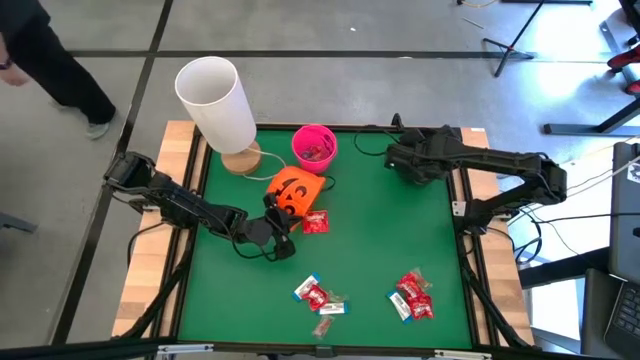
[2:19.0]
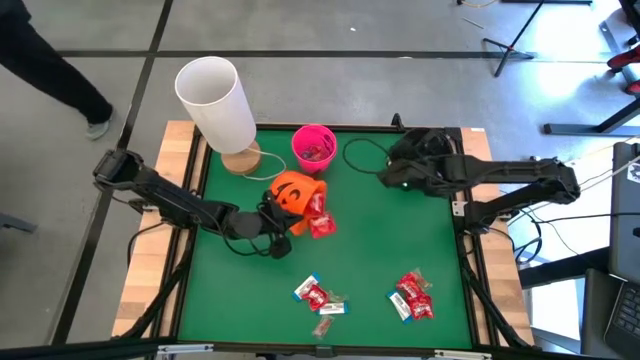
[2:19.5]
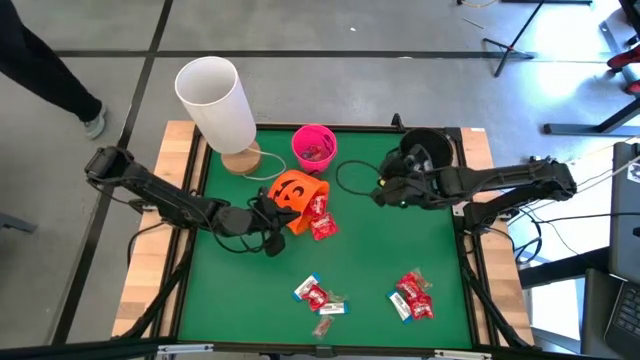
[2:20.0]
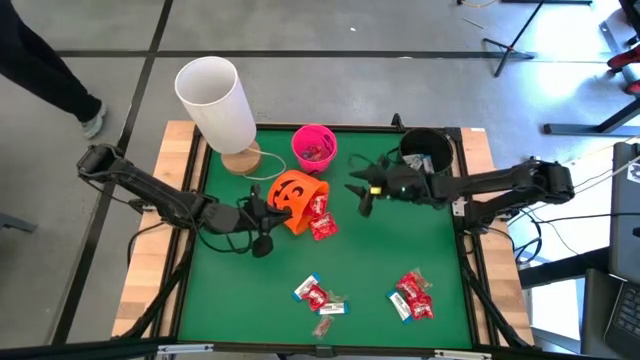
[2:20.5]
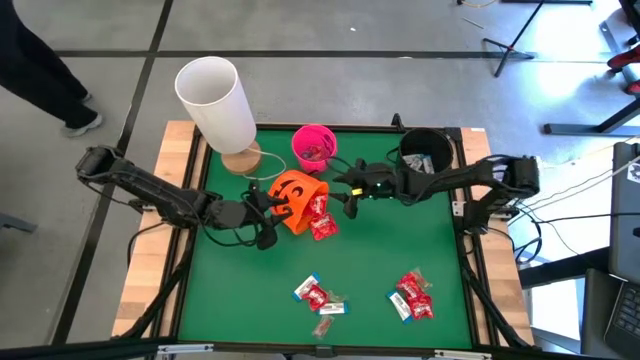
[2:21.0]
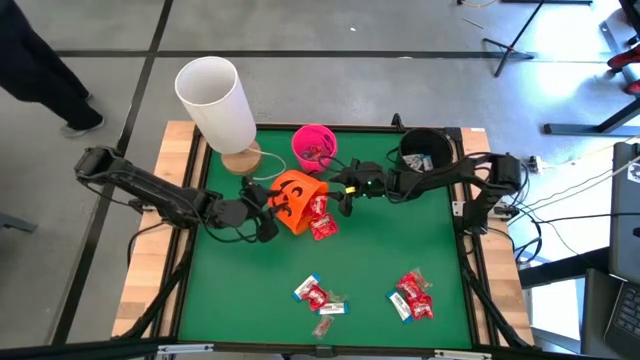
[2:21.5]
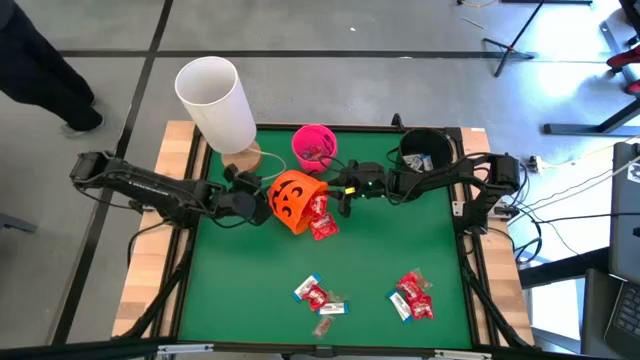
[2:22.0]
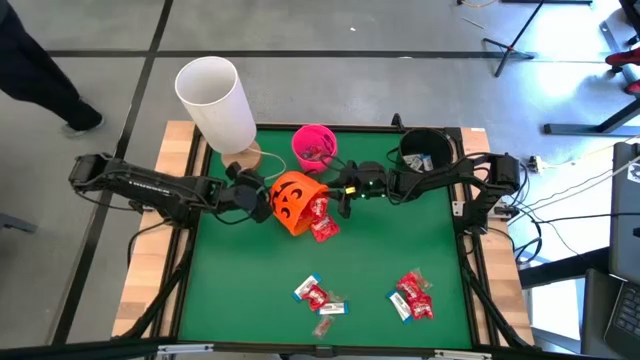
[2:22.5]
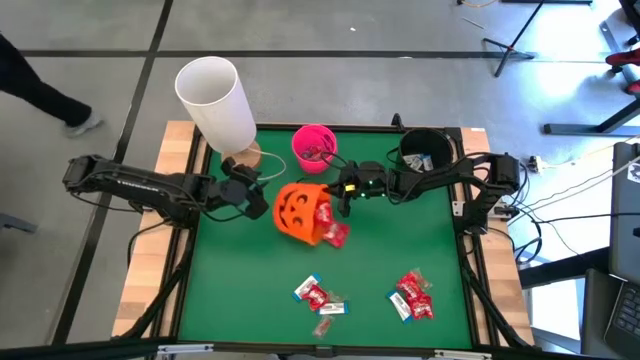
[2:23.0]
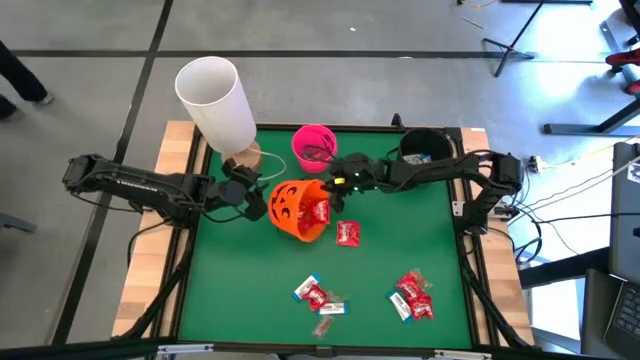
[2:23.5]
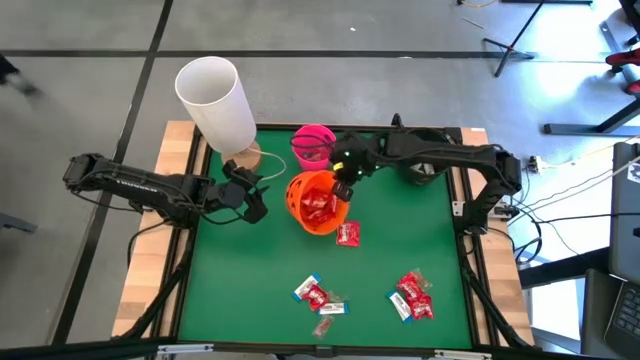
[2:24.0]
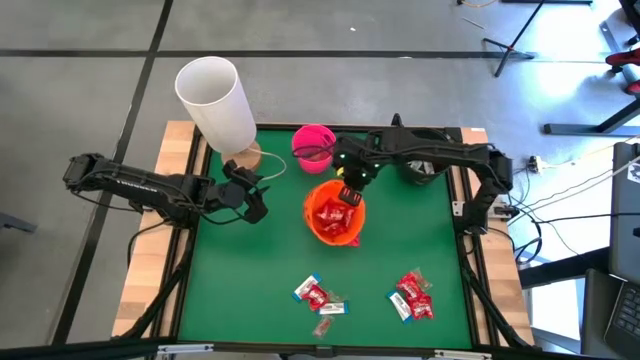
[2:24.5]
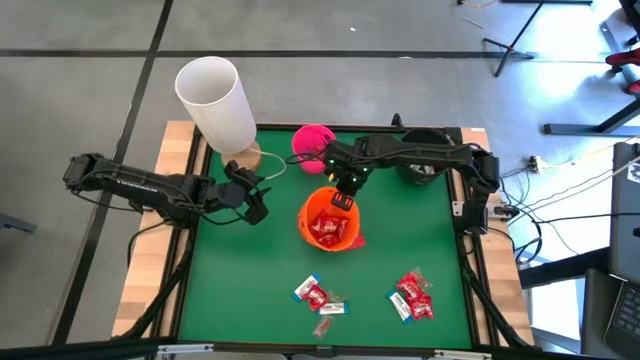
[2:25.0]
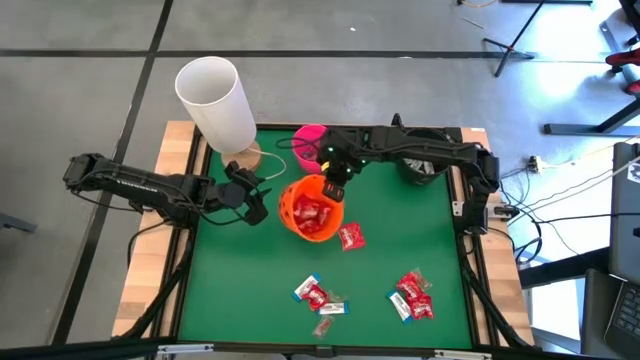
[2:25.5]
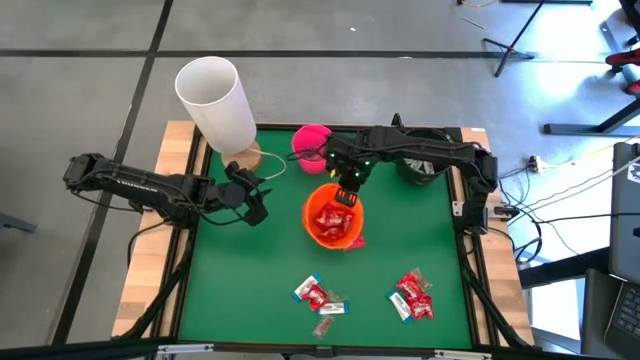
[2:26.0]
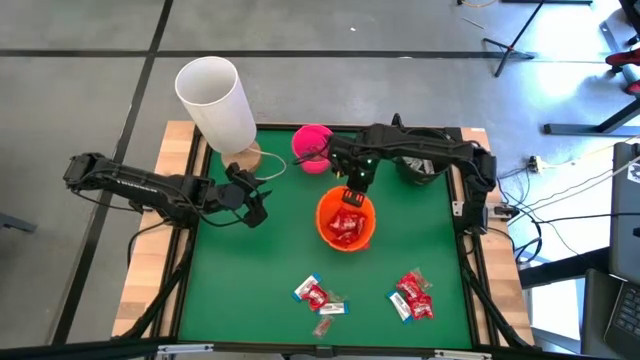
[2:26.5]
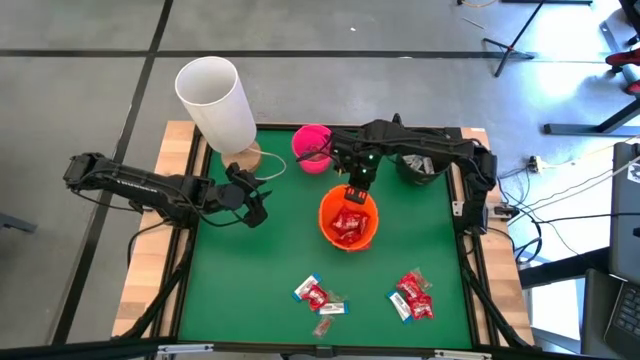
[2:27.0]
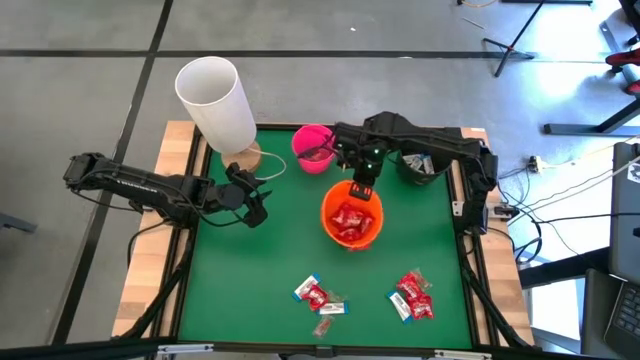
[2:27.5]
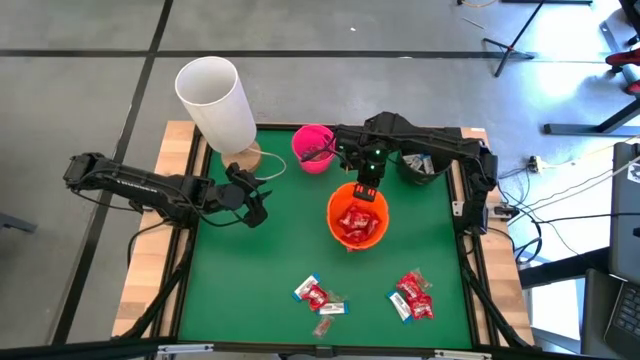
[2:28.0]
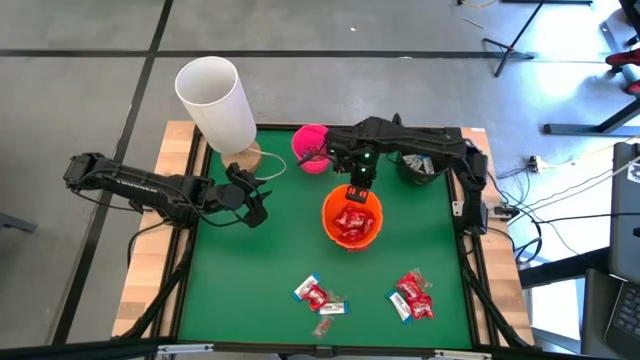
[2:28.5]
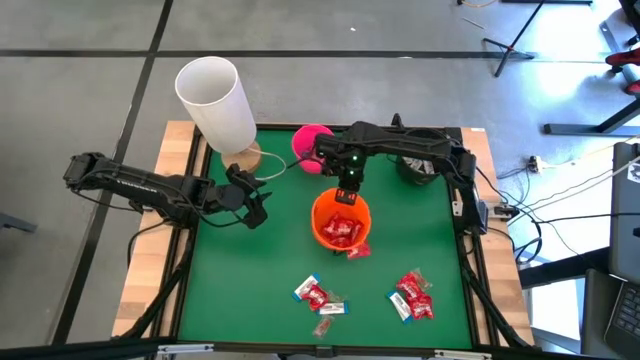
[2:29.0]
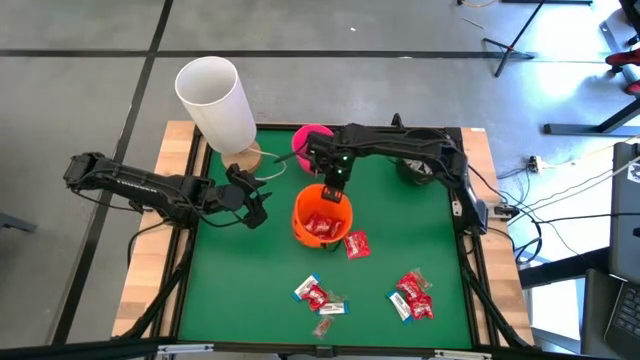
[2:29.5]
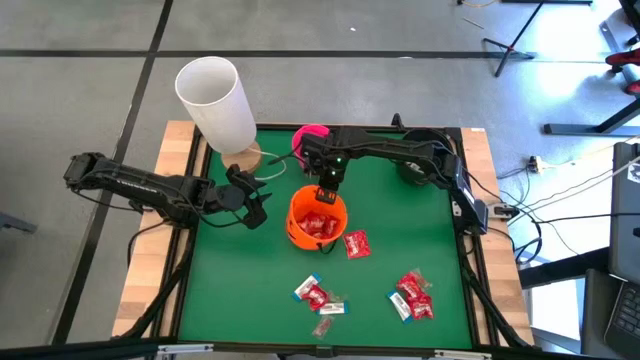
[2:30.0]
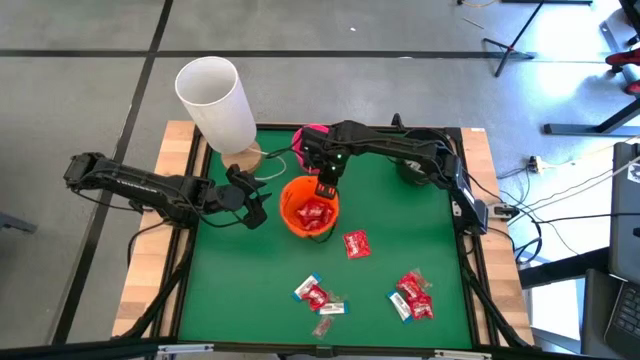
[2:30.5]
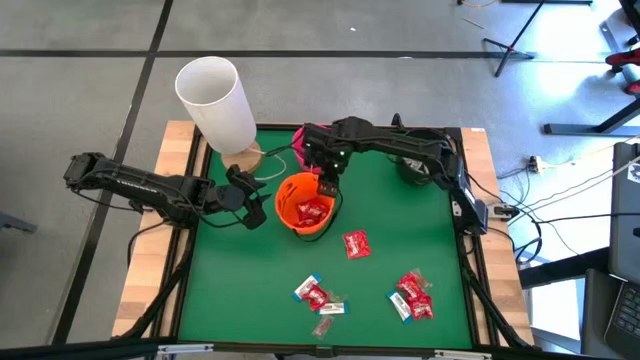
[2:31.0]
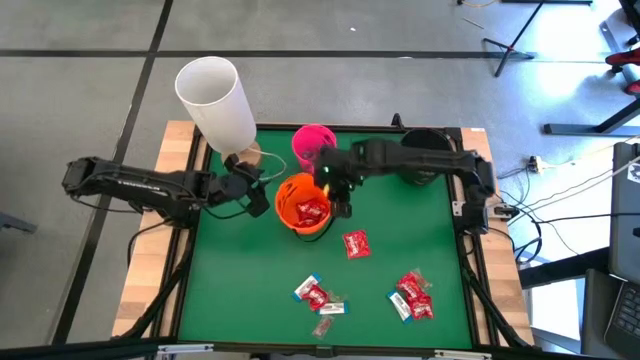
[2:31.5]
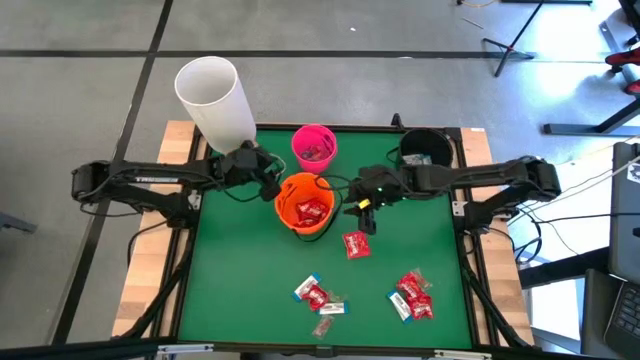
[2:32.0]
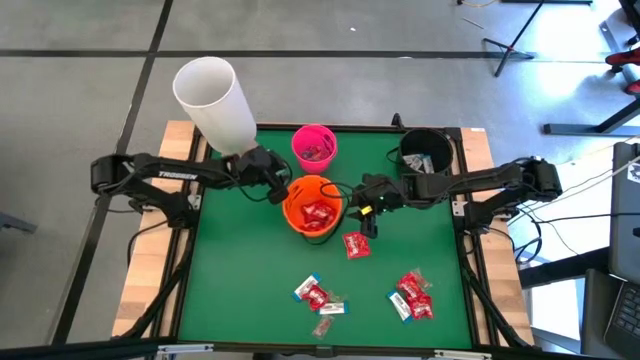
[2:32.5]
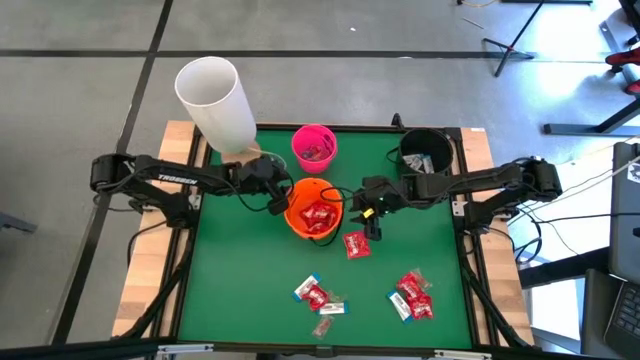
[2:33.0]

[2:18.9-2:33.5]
Task: Sort candy
Adjust the orange bucket

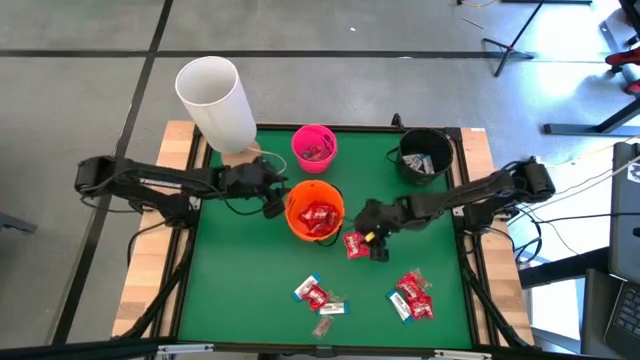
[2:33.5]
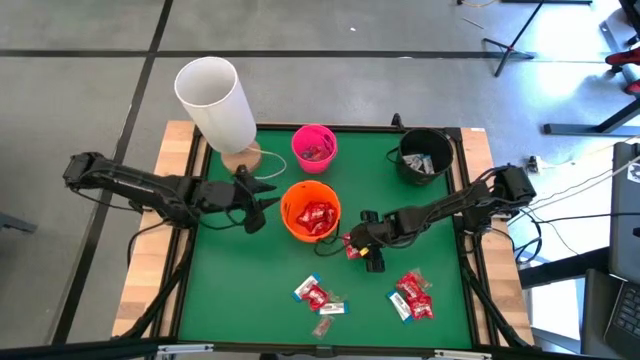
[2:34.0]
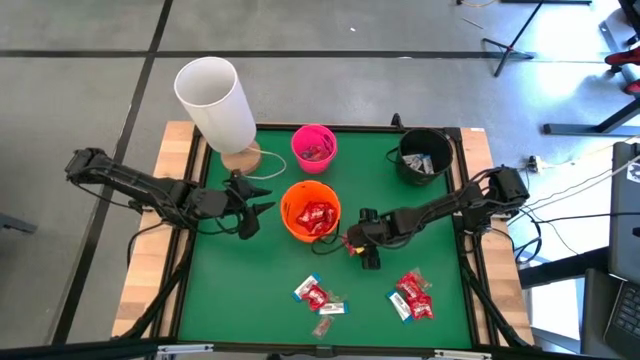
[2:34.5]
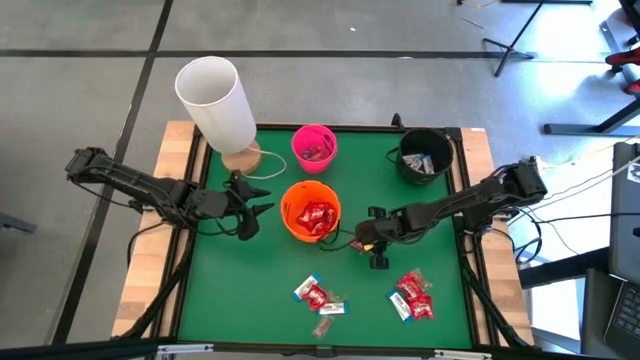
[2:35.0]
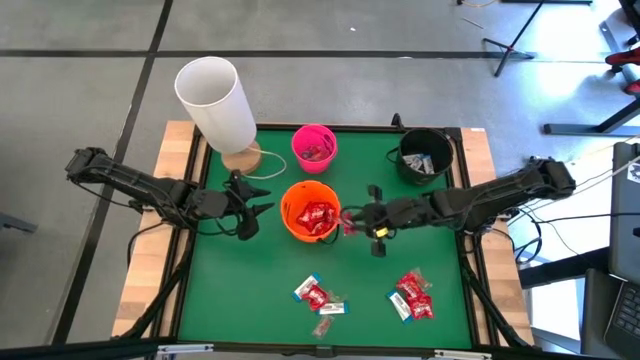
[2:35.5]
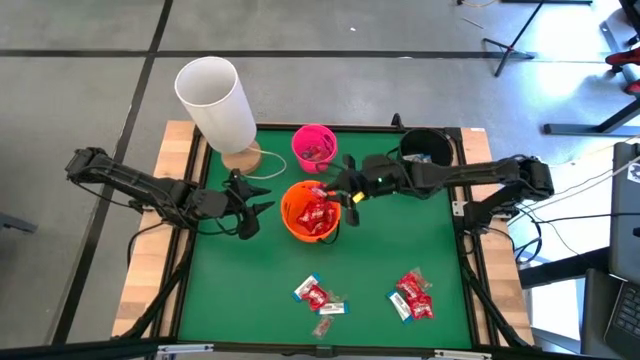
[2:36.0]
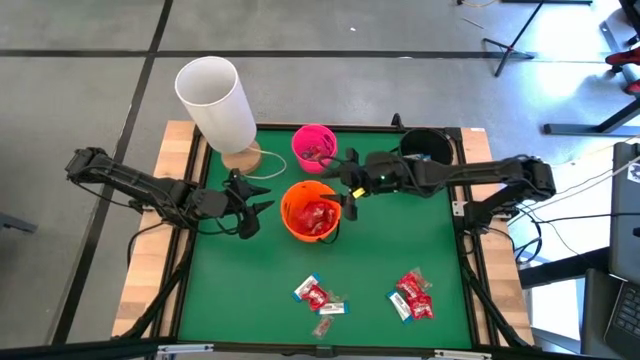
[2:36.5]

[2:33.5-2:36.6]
Put the red candy into the orange bucket

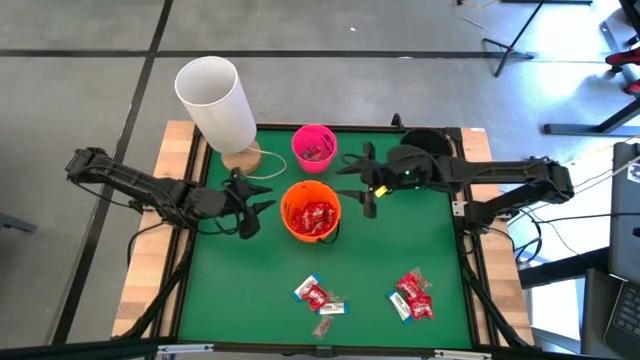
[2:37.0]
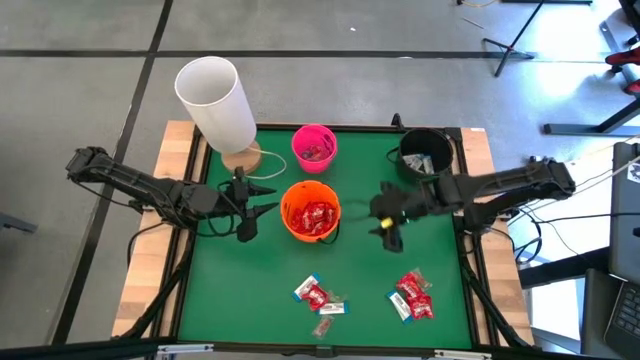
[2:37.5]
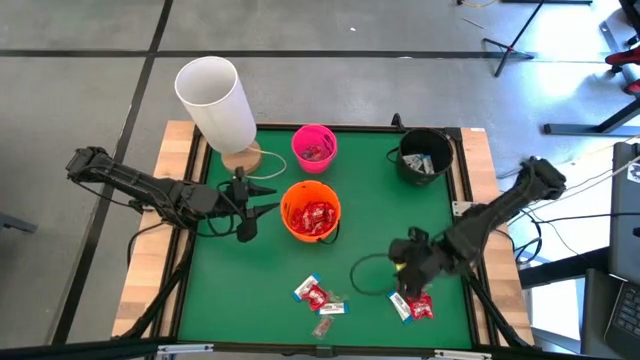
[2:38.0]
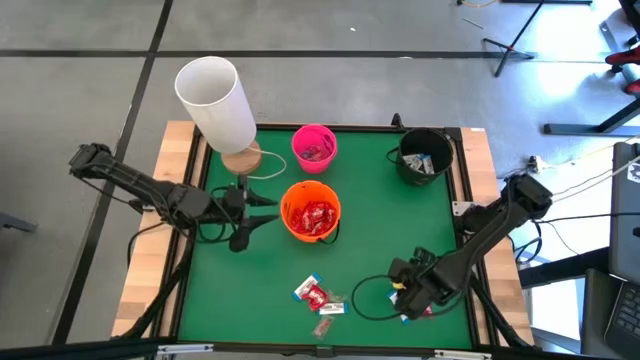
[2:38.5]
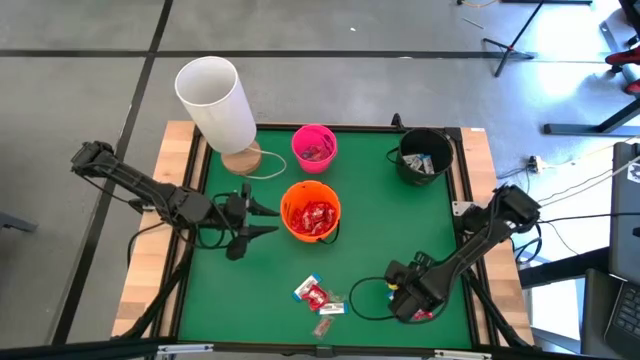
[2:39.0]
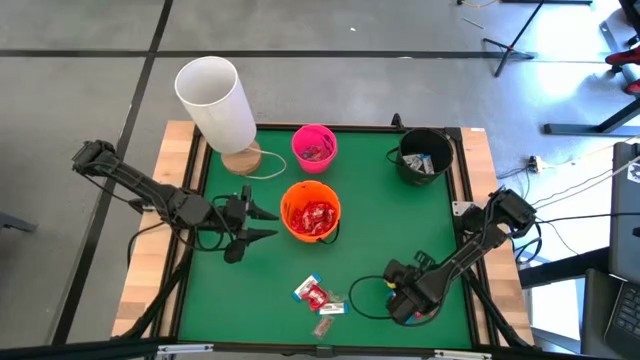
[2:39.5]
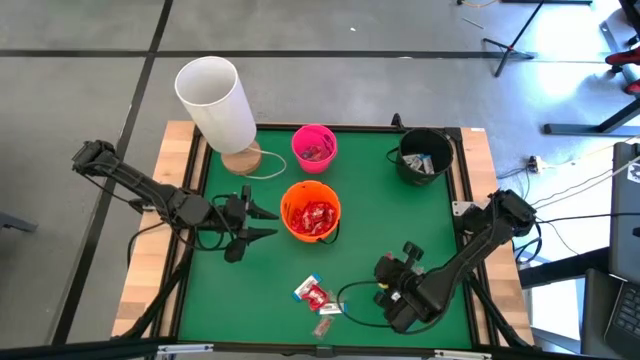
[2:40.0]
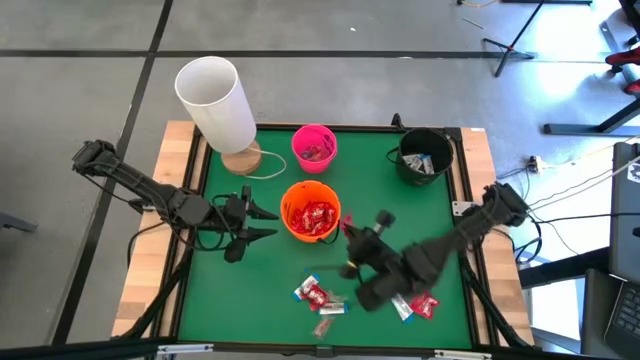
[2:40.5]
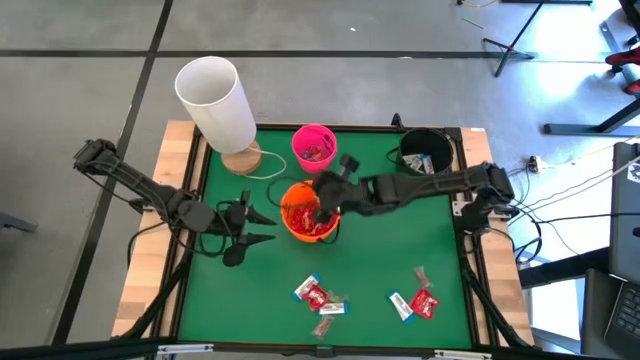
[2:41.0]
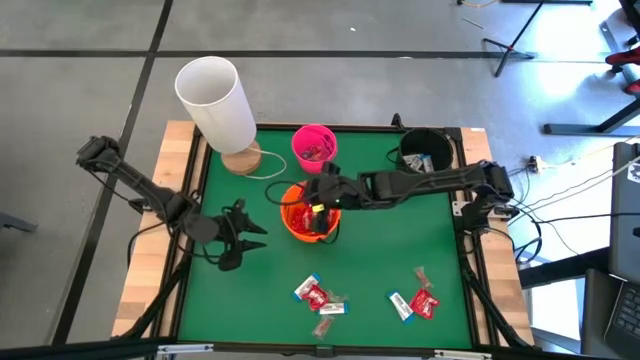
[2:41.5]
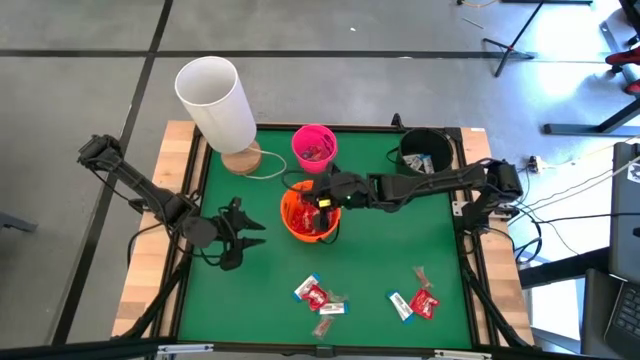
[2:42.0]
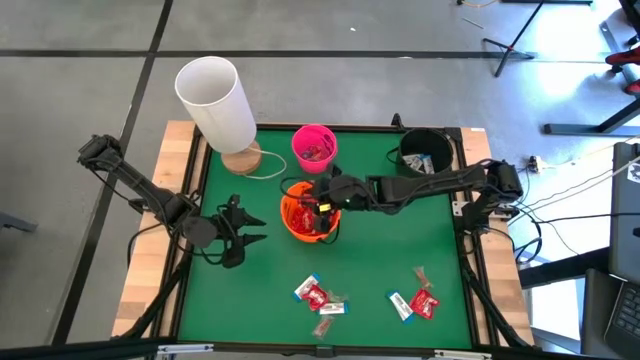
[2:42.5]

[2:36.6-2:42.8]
Put the red candy into the orange bin
